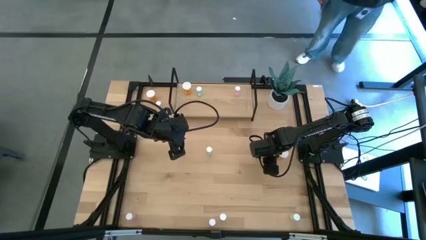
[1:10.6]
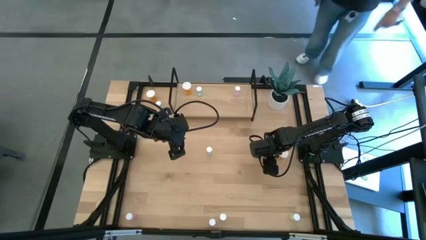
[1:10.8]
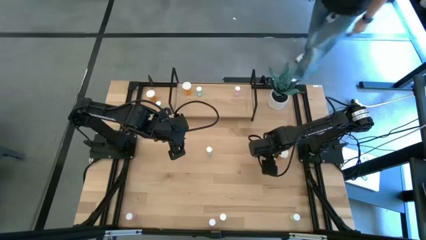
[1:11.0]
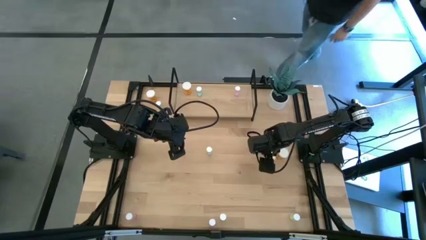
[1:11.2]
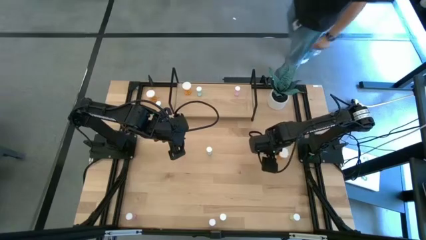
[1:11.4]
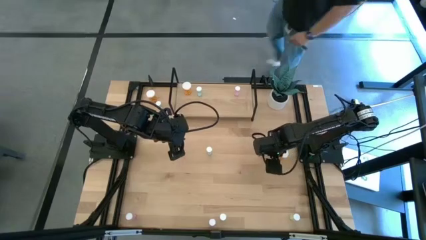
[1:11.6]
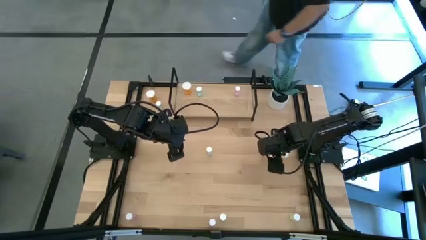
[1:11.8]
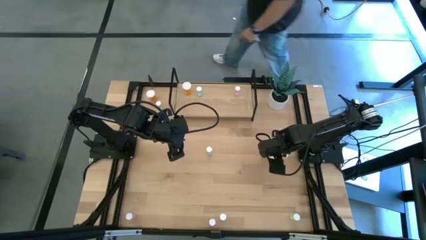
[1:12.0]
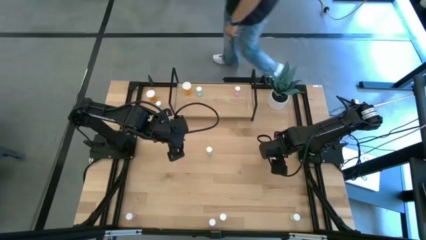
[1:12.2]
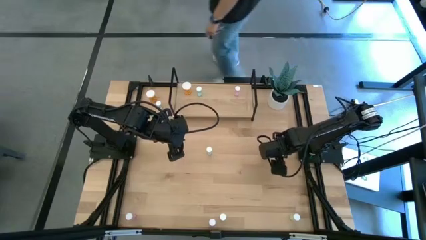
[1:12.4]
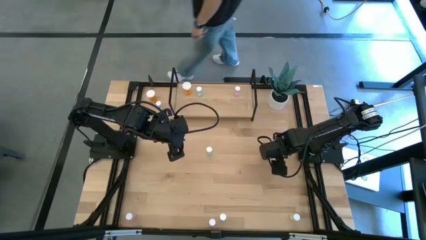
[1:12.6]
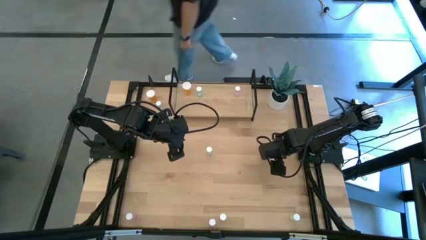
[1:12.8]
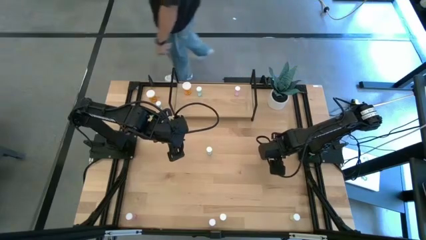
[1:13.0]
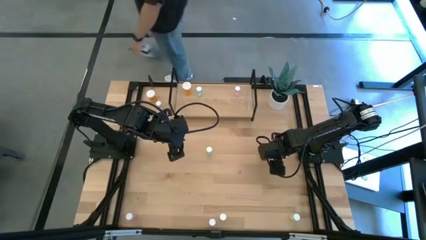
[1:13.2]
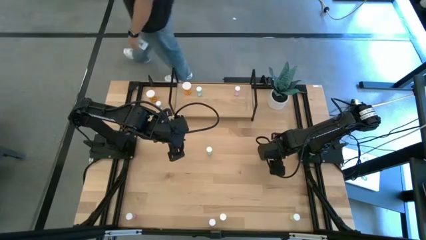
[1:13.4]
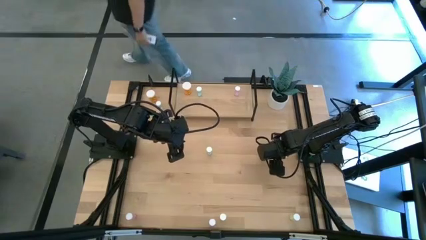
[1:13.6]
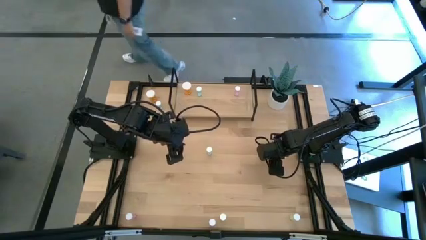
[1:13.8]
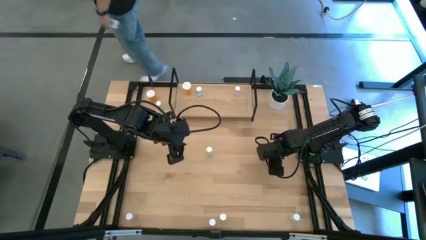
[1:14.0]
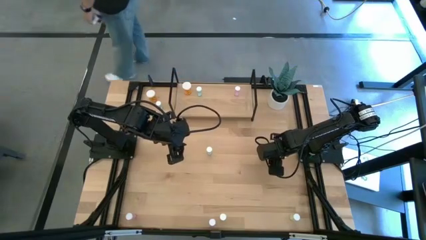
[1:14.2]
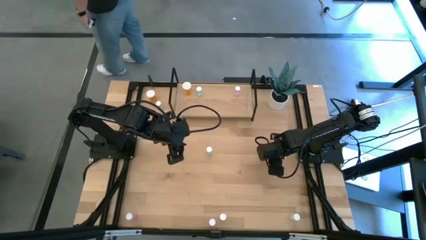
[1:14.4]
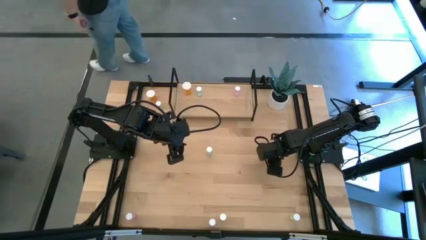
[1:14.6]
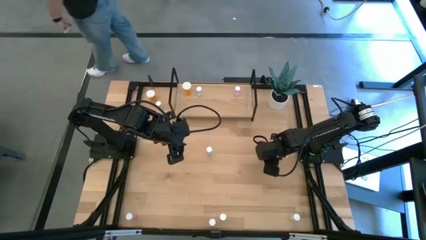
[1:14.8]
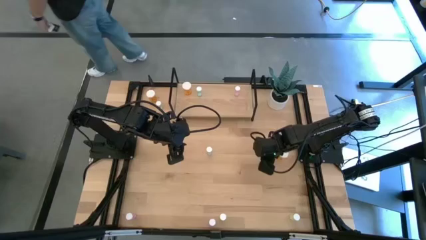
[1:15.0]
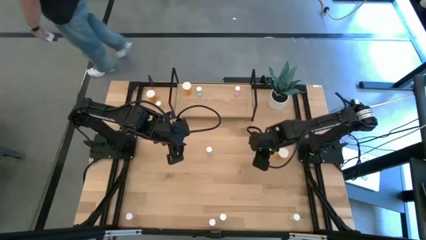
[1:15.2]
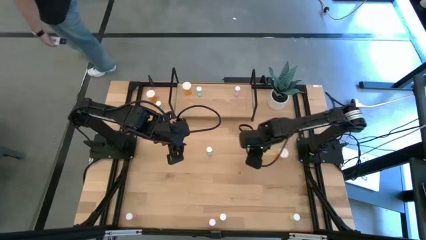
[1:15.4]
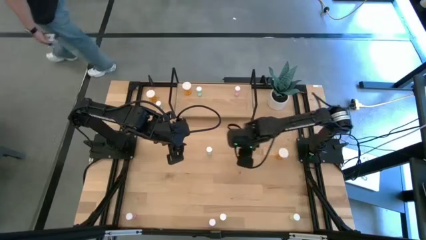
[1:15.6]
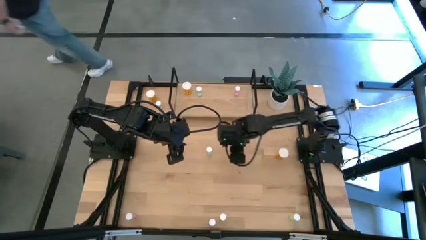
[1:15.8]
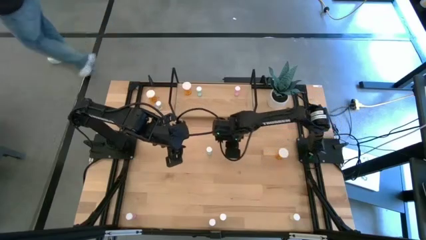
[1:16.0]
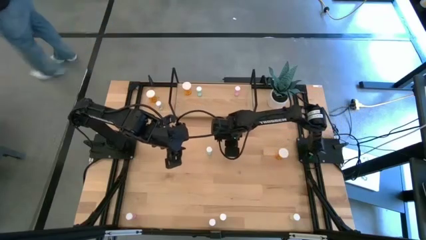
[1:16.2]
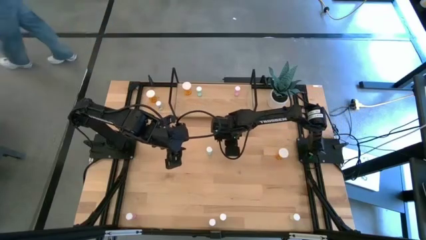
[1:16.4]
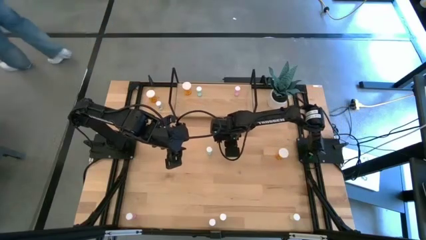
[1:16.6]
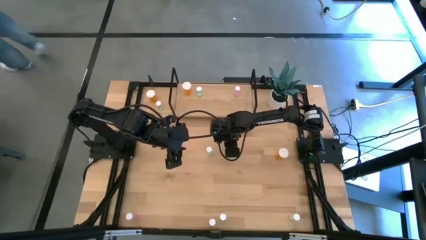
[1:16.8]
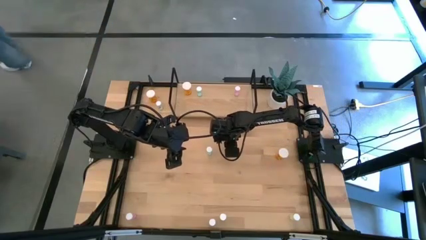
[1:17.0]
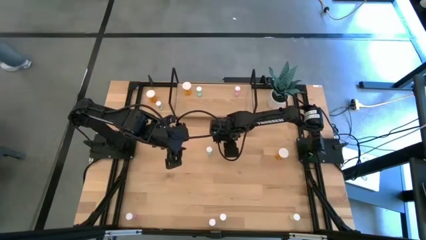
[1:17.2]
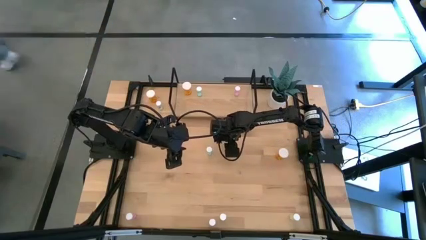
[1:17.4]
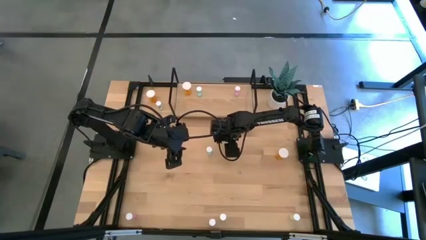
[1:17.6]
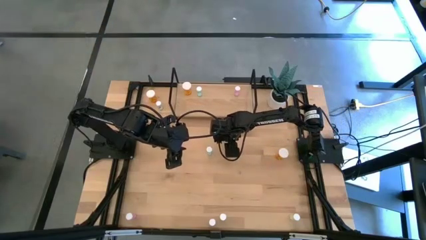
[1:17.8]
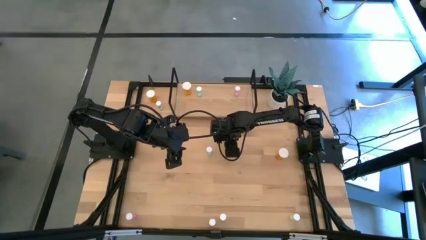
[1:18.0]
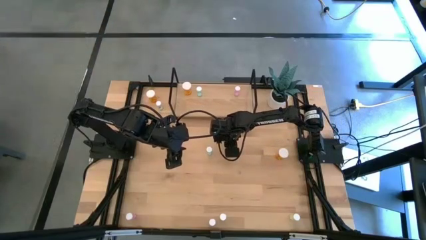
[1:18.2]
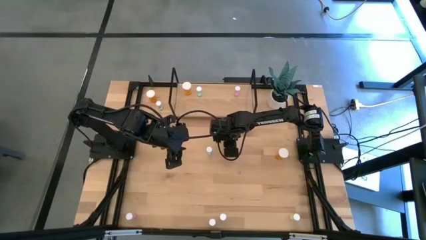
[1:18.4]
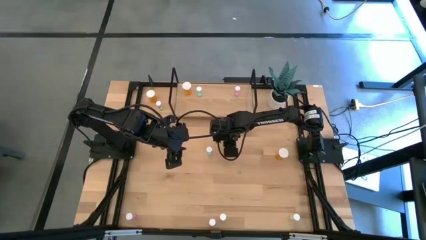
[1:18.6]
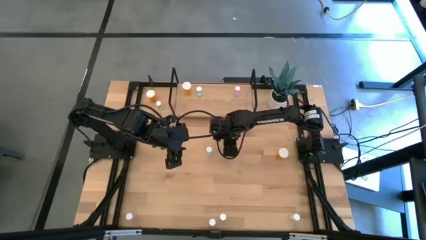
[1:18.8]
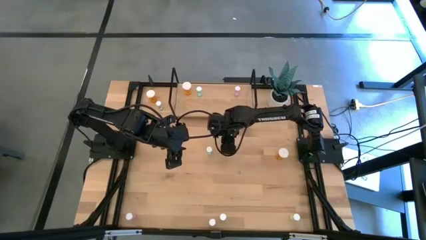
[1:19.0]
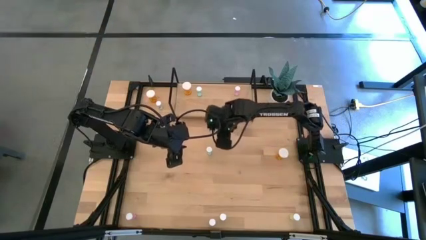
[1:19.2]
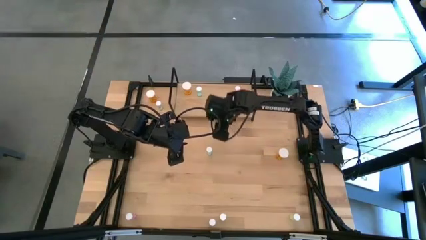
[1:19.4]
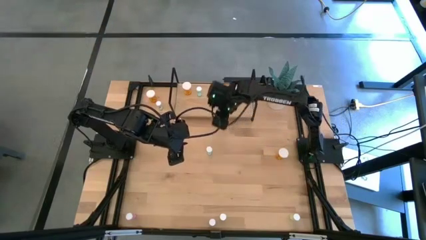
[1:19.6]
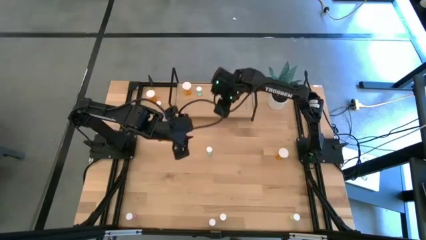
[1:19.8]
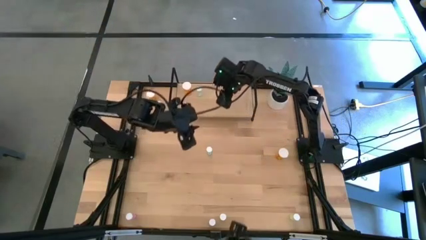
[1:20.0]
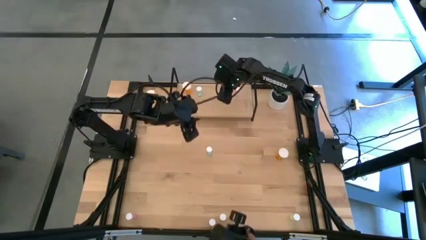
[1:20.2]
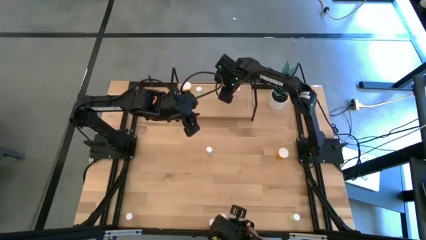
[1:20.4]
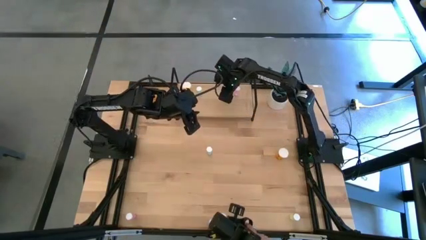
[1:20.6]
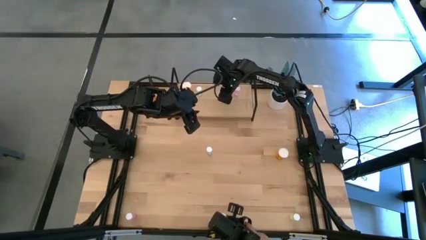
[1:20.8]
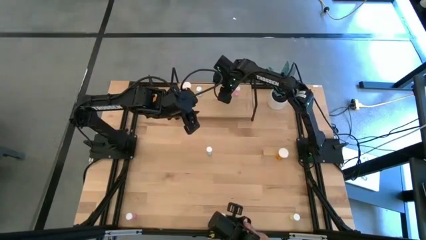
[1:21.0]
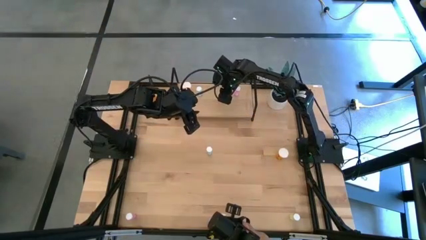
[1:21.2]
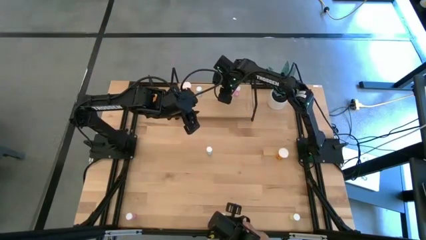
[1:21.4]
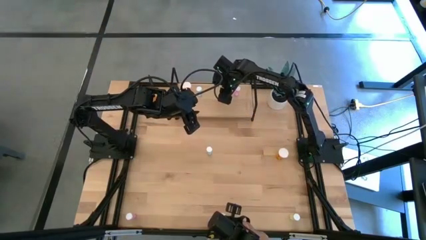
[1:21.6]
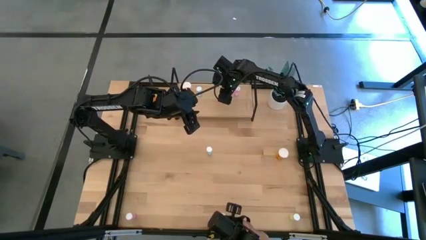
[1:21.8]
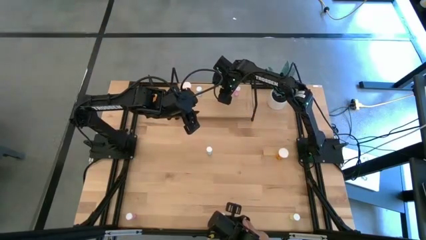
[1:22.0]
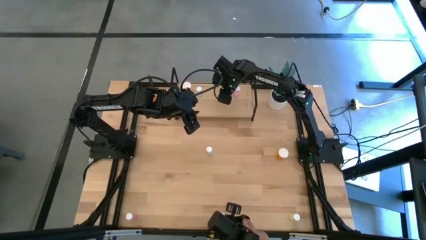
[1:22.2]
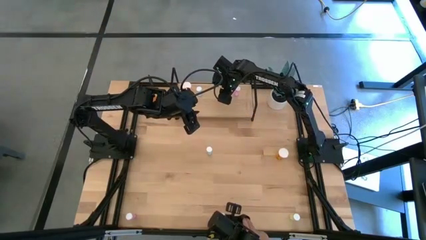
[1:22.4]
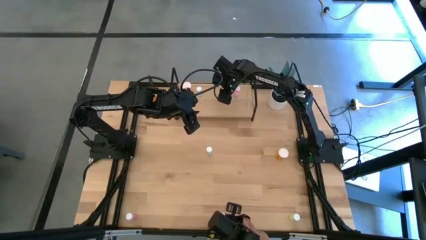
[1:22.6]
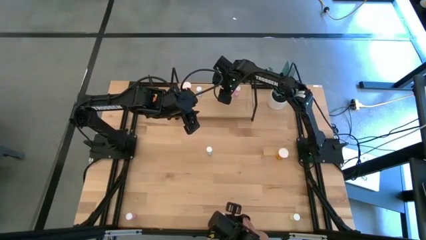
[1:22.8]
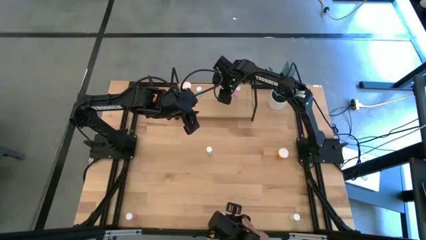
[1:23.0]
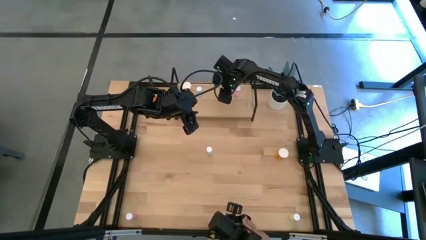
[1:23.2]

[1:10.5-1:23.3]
Task: Pick and place medicine bottles onto shelf by color
Put the top yellow pill bottle on the shelf
